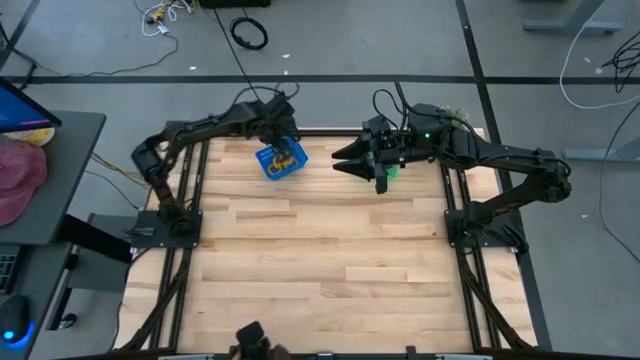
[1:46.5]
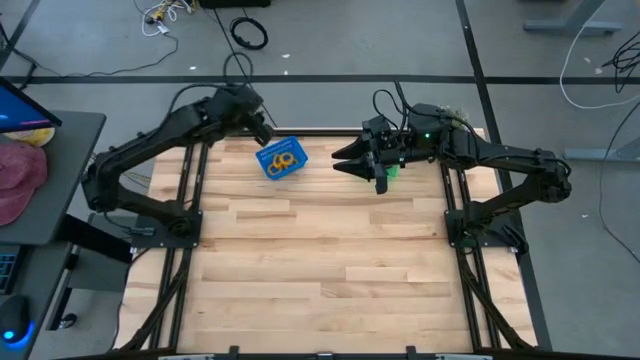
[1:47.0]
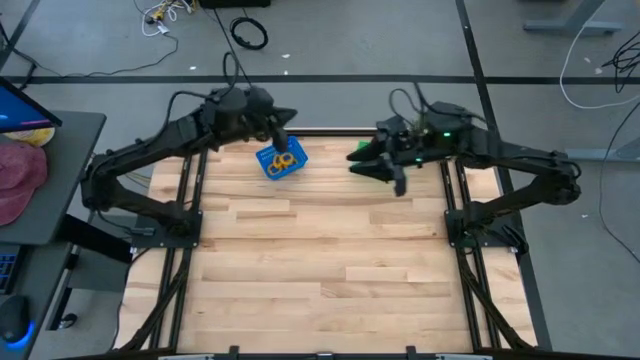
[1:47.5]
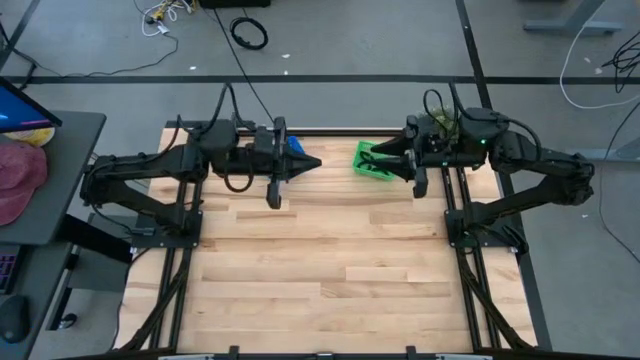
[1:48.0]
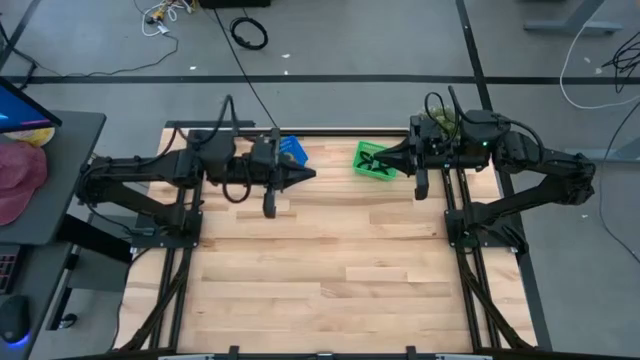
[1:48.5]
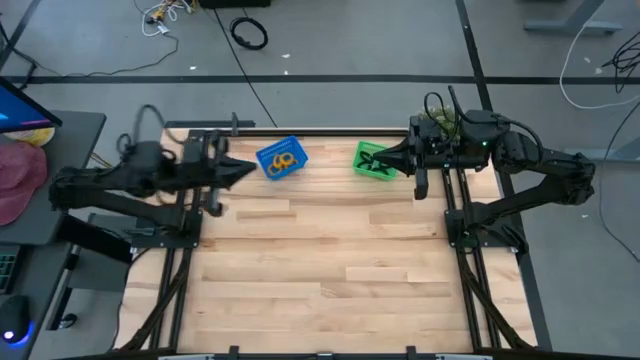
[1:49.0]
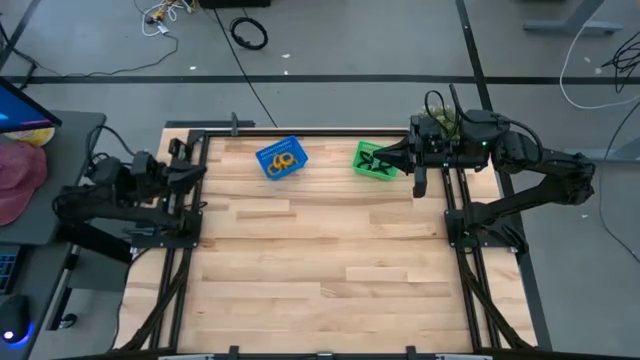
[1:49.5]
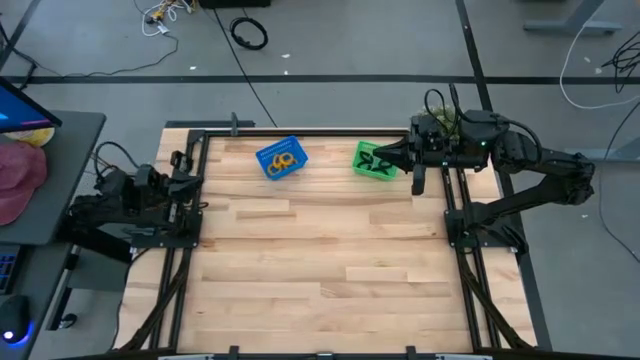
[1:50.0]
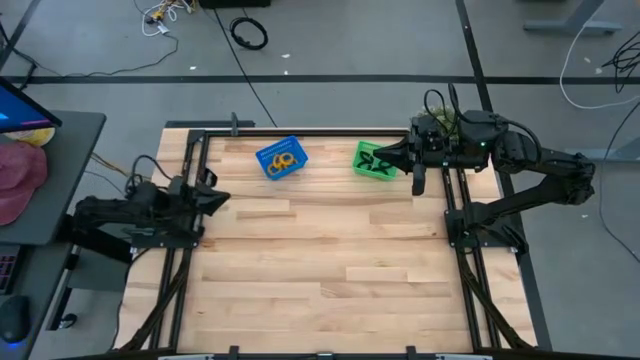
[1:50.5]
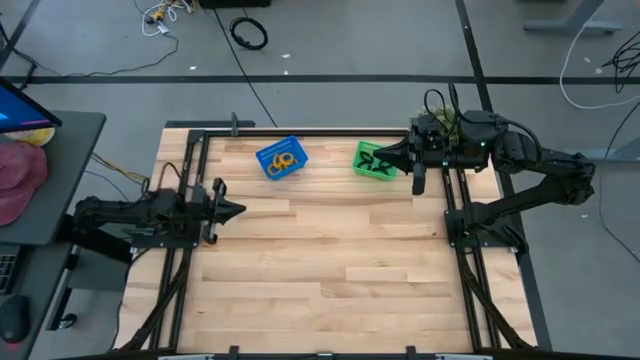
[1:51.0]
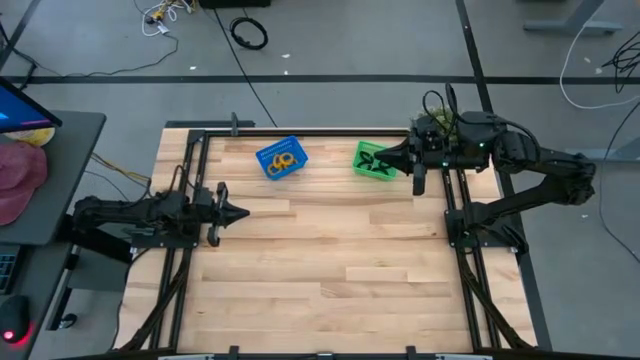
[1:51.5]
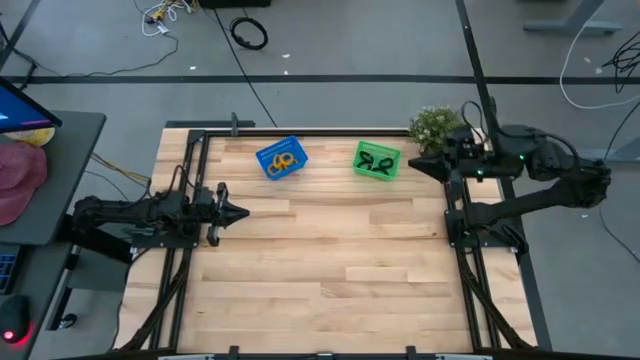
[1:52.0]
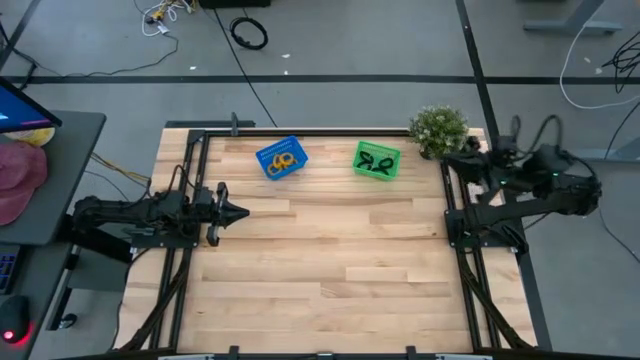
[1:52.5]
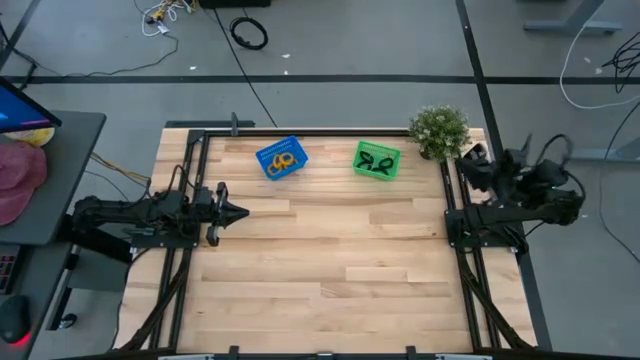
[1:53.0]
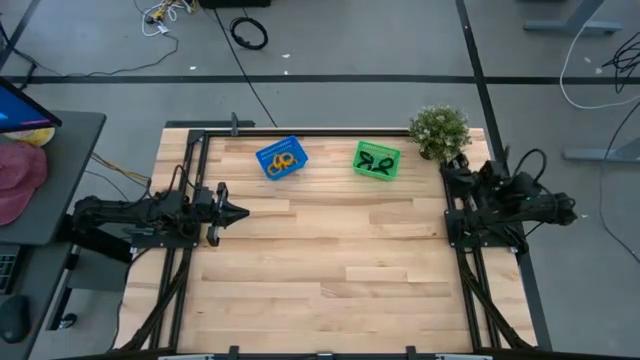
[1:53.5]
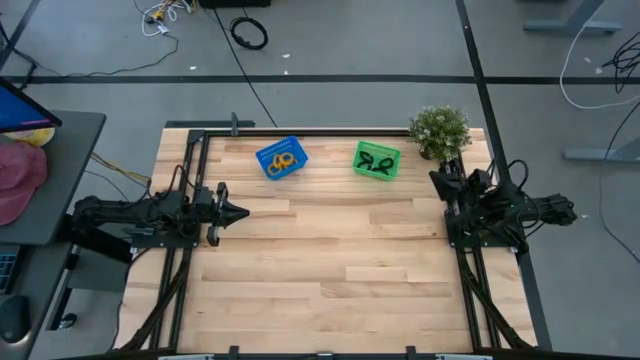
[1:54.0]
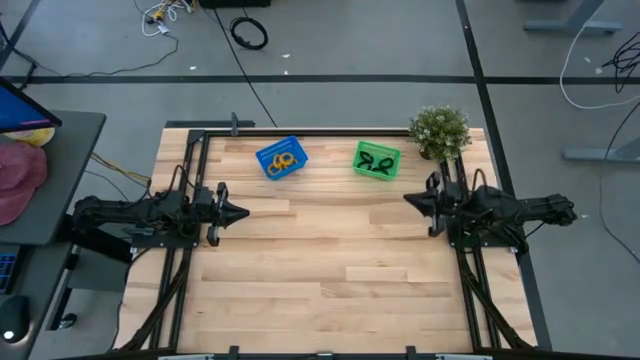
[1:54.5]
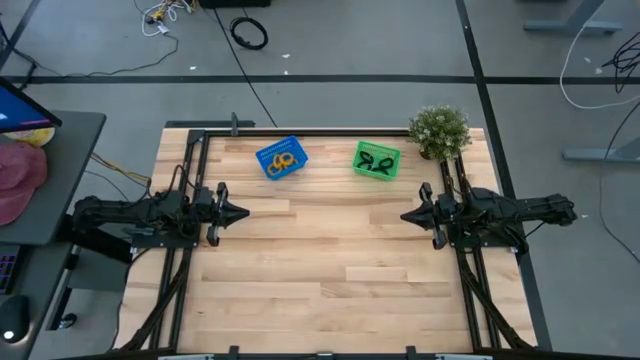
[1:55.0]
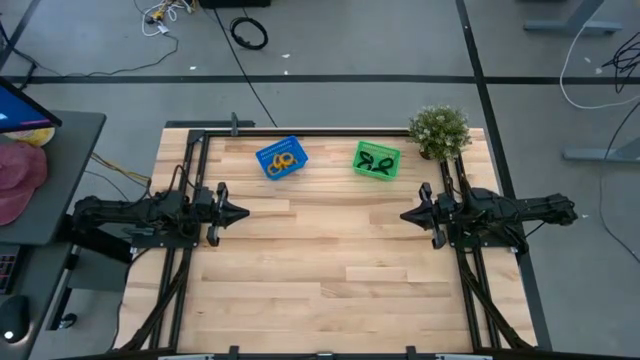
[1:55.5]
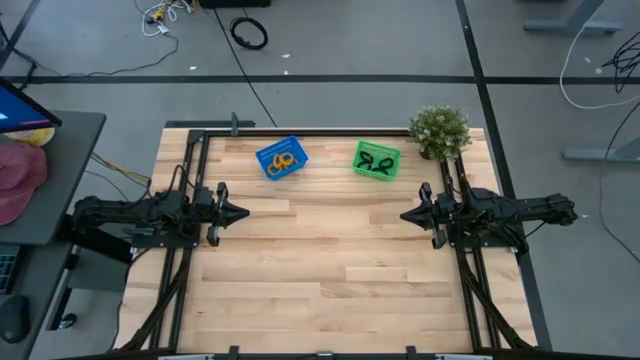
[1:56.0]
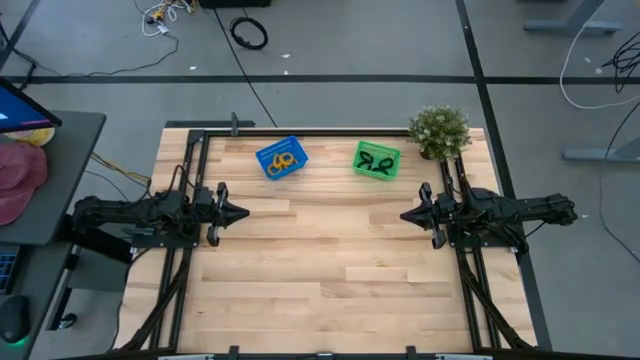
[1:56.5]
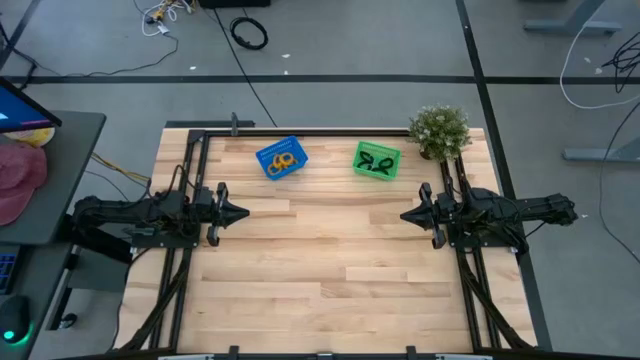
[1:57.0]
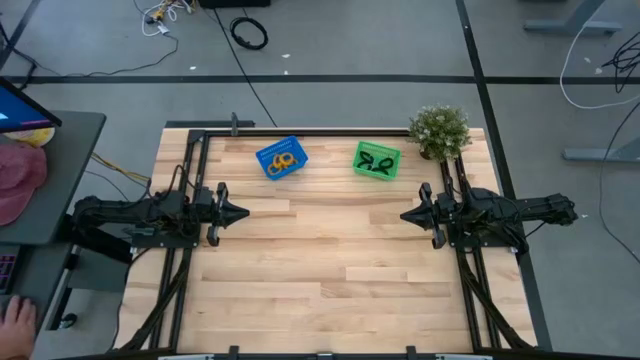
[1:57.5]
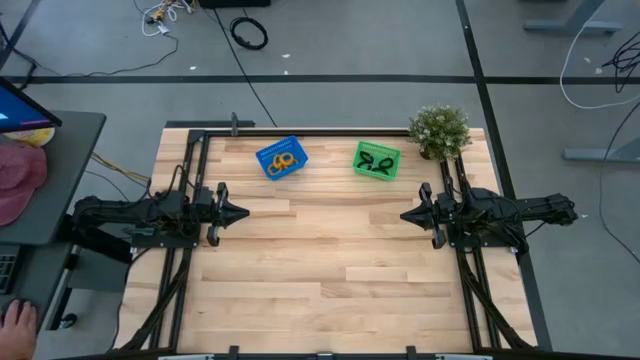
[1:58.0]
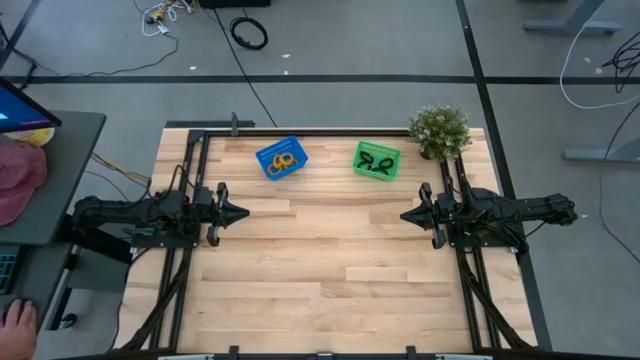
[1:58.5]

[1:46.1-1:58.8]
Task: Sort spring keychains
Return to home position

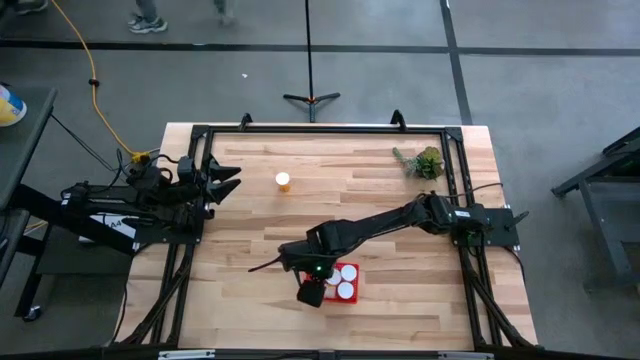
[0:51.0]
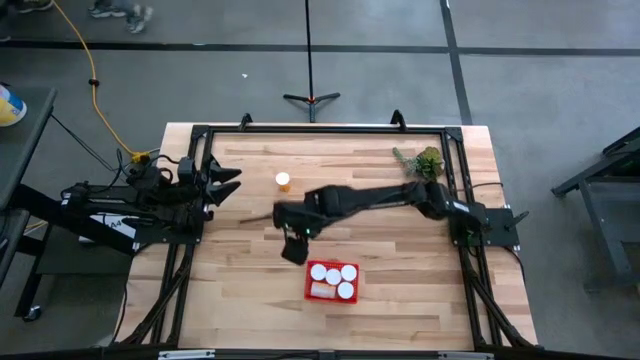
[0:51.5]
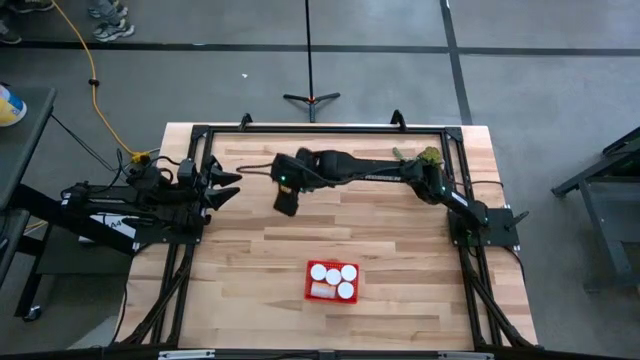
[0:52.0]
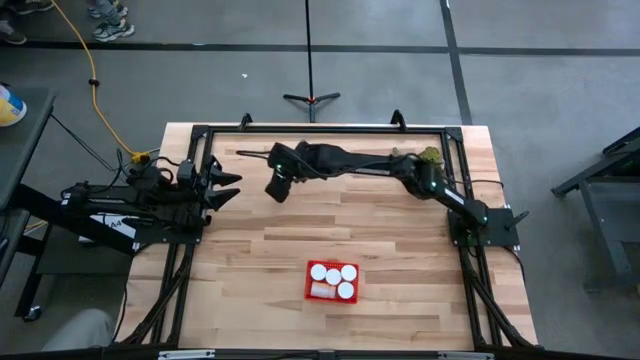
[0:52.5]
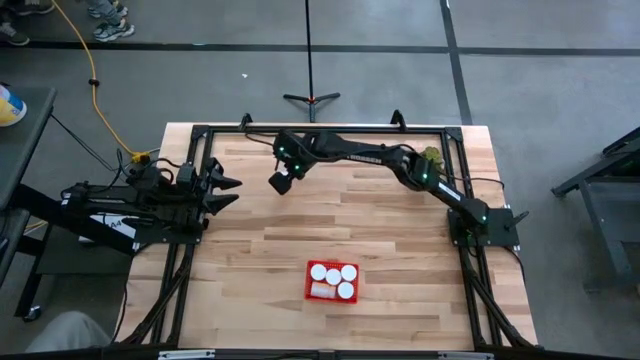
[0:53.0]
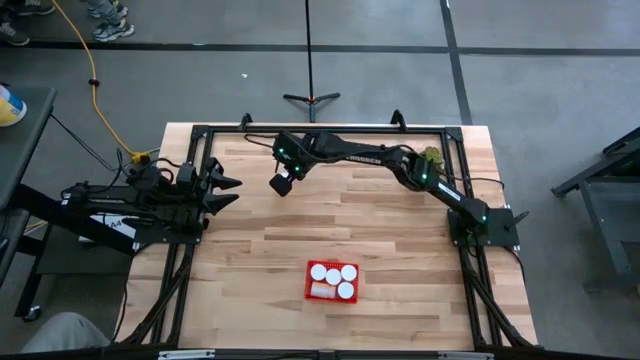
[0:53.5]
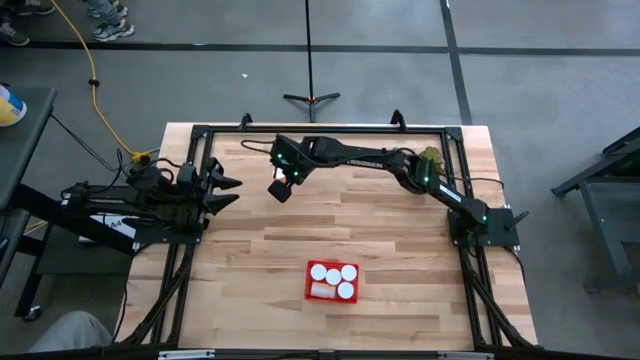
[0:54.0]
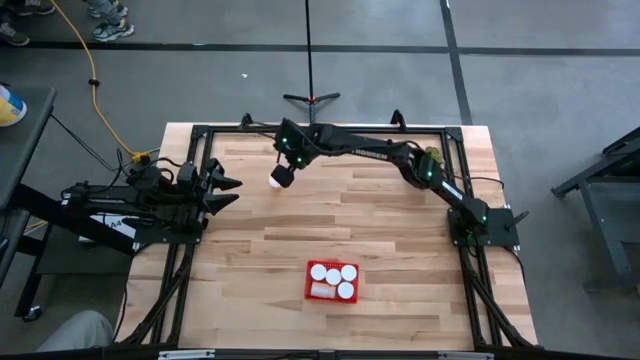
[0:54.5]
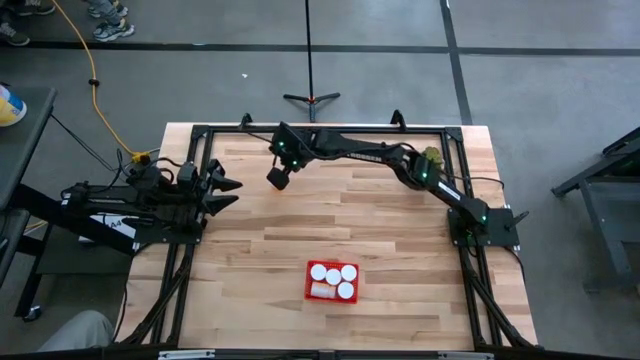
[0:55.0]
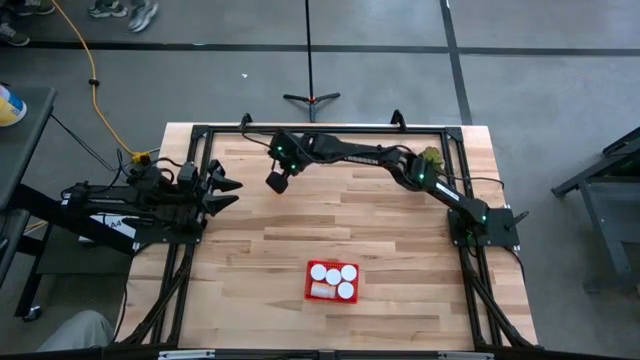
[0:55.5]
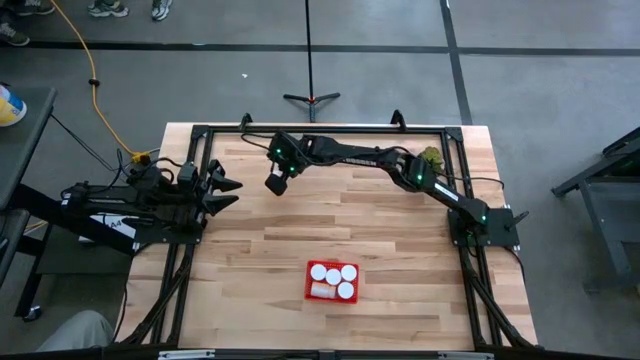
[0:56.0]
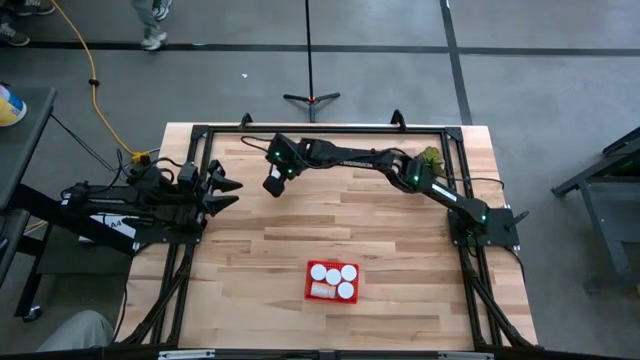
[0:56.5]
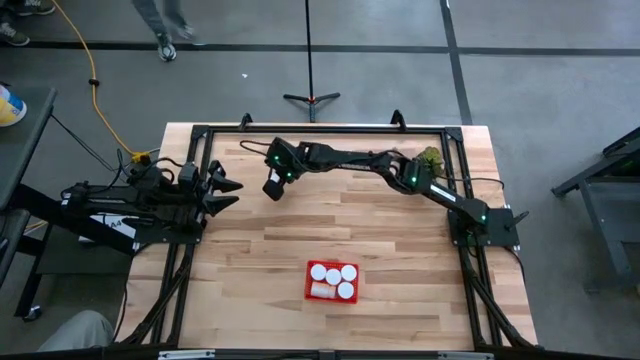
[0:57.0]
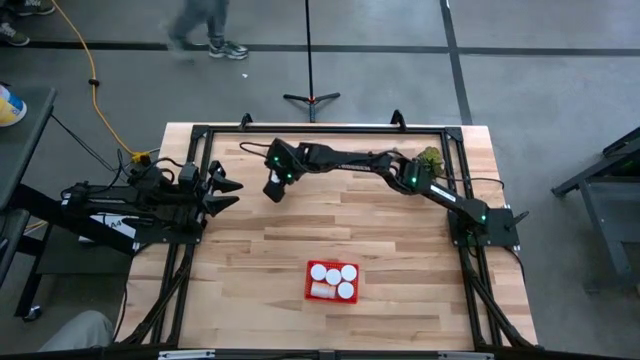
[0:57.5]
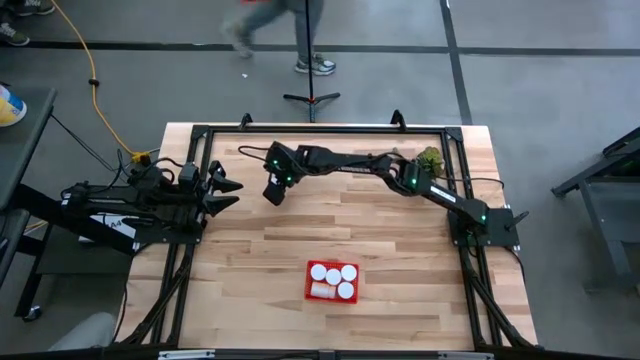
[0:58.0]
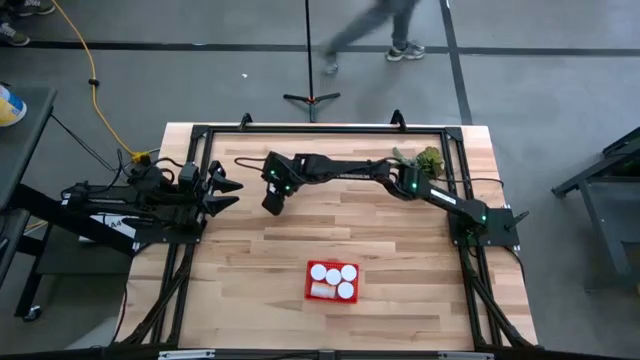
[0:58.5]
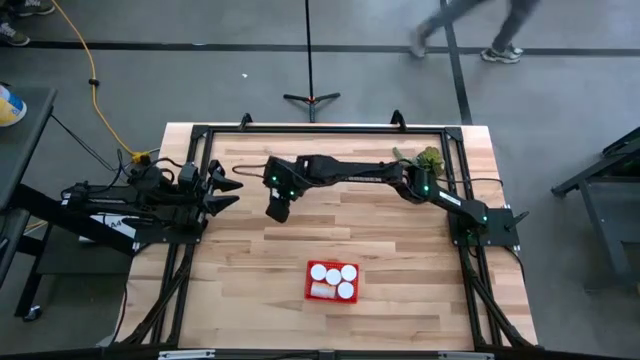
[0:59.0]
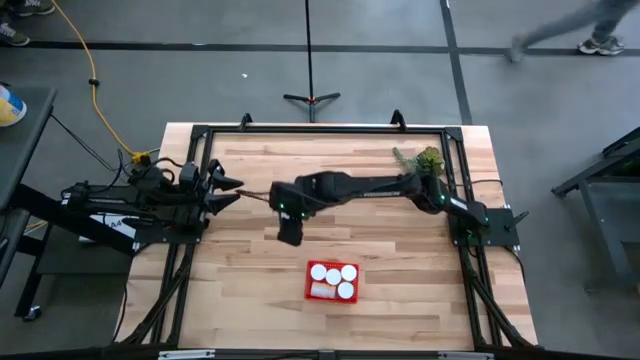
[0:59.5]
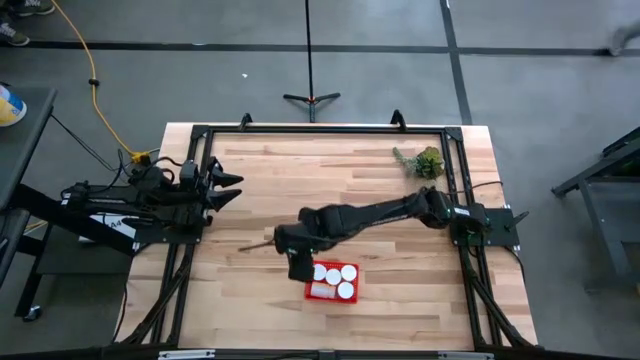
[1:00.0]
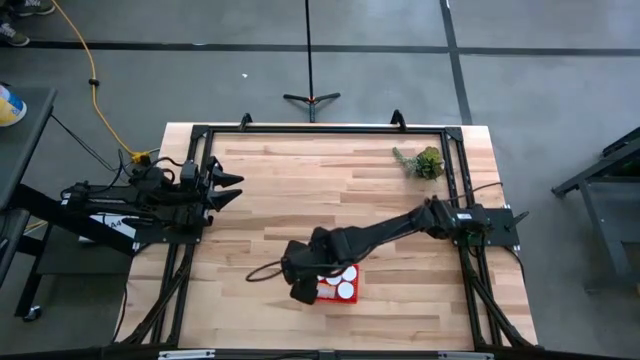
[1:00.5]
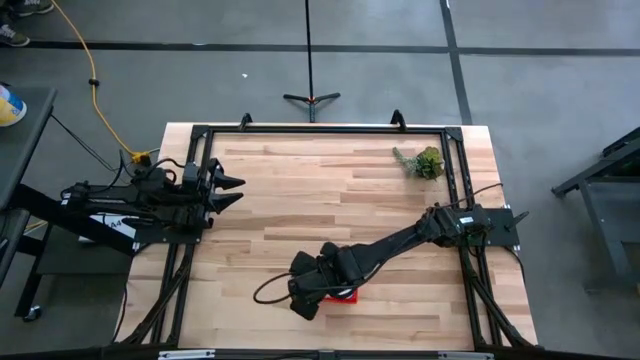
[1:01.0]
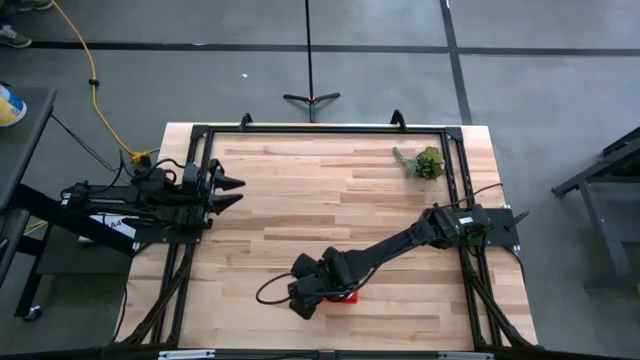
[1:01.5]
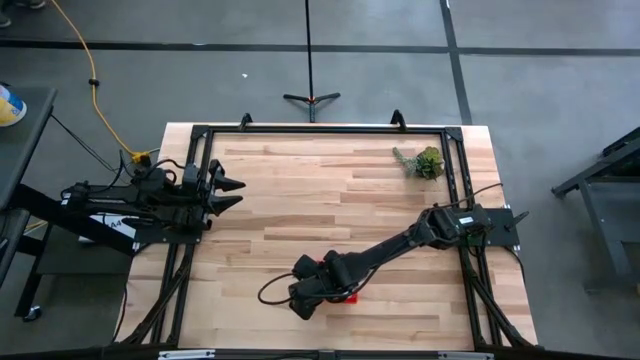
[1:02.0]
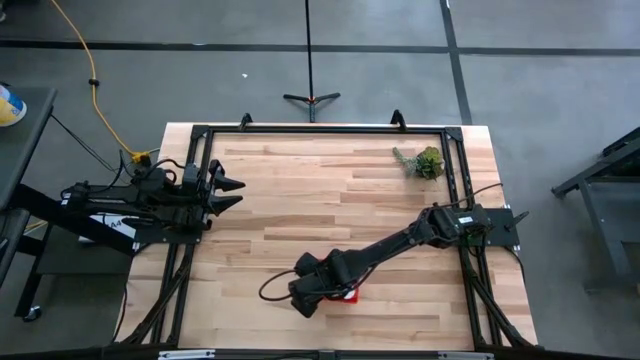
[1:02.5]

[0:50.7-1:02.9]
Task: Pick and place pill bottles into a basket
Put the orange pill bottle into the red basket
